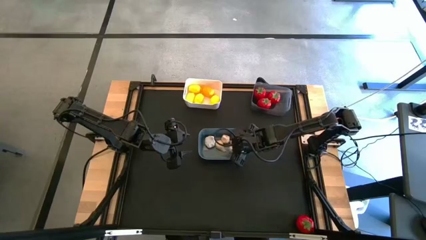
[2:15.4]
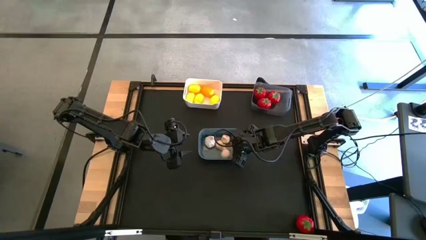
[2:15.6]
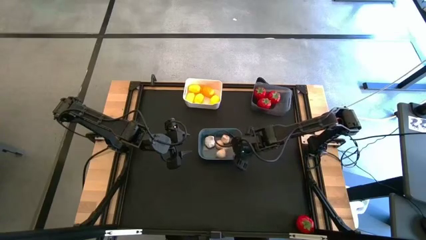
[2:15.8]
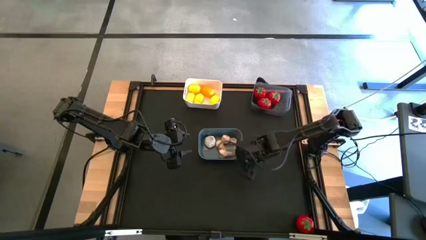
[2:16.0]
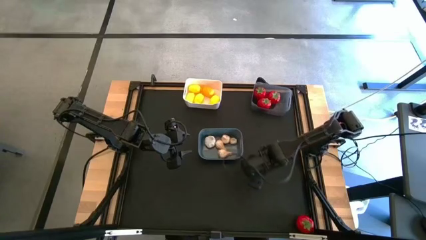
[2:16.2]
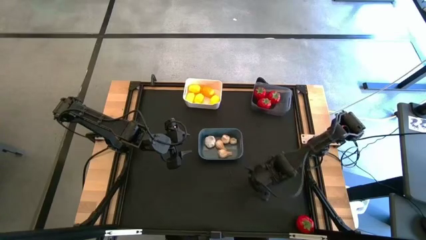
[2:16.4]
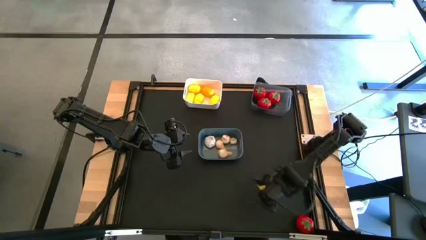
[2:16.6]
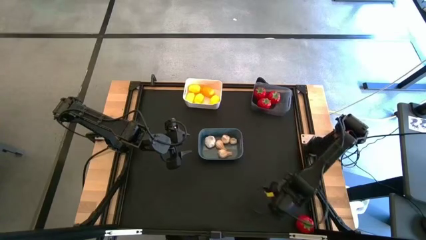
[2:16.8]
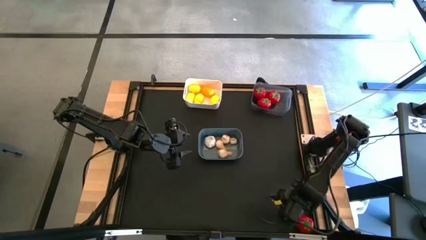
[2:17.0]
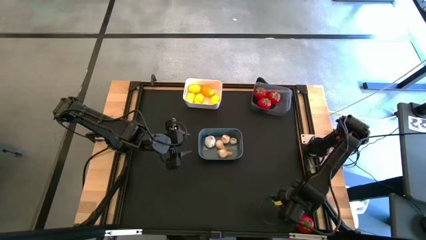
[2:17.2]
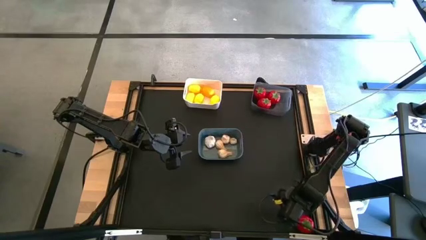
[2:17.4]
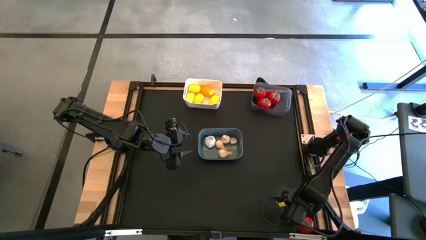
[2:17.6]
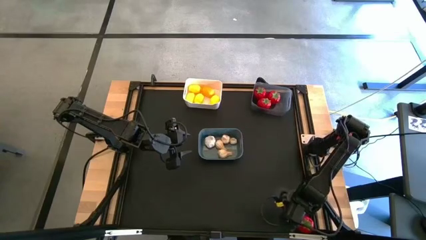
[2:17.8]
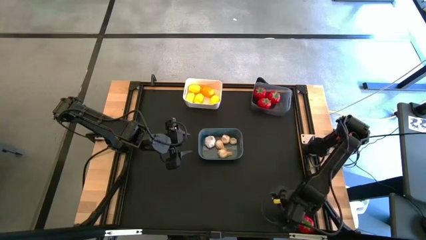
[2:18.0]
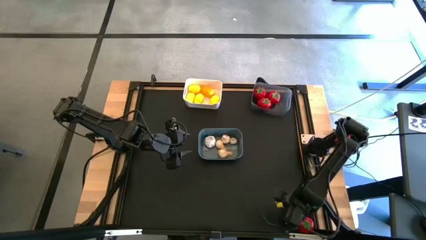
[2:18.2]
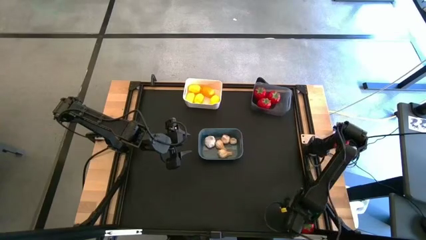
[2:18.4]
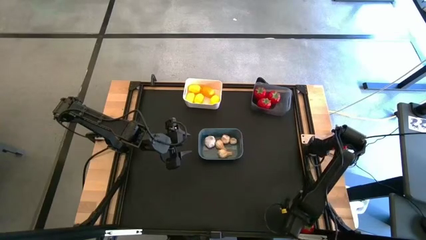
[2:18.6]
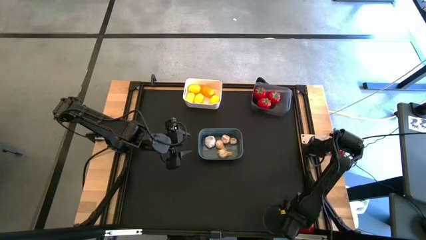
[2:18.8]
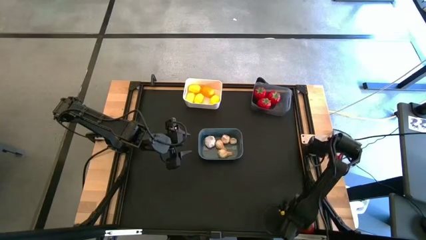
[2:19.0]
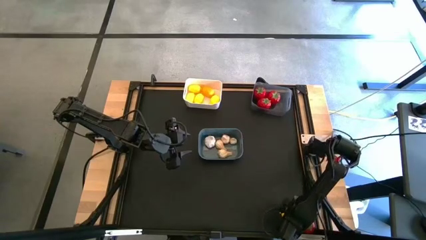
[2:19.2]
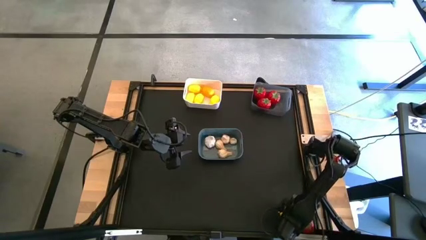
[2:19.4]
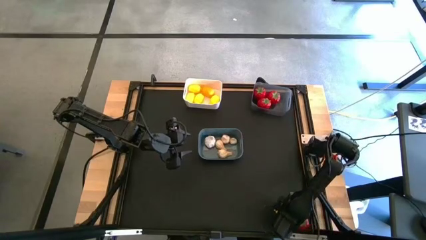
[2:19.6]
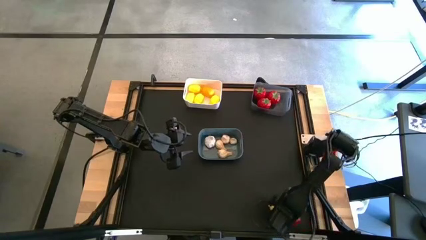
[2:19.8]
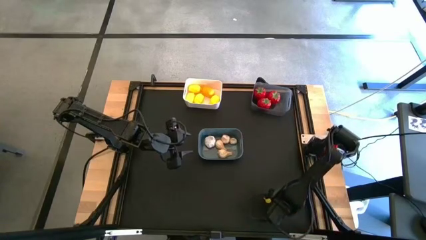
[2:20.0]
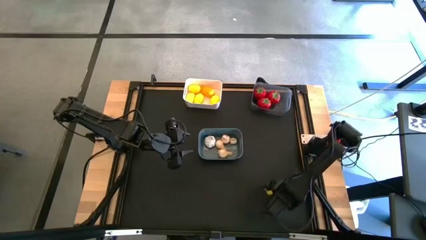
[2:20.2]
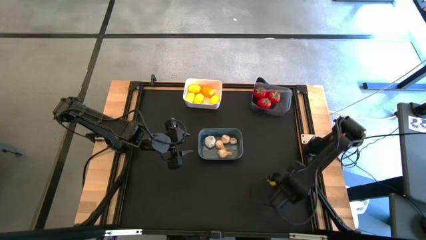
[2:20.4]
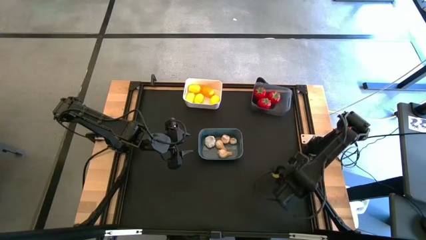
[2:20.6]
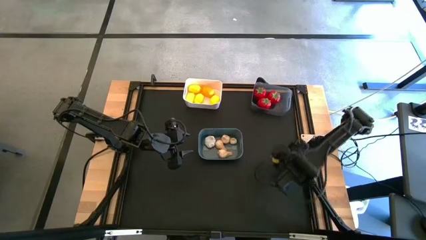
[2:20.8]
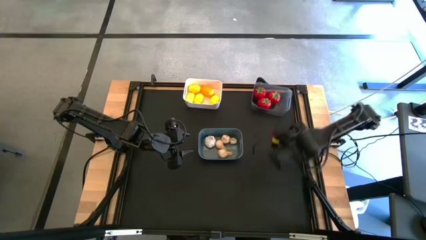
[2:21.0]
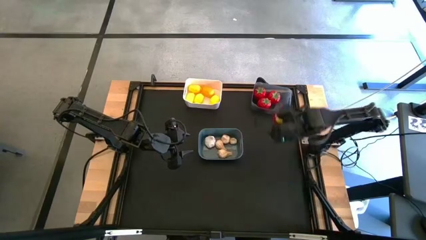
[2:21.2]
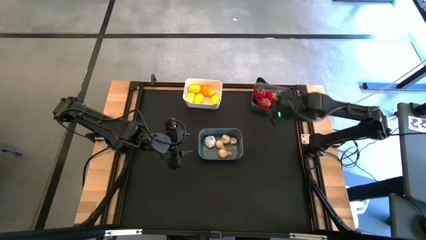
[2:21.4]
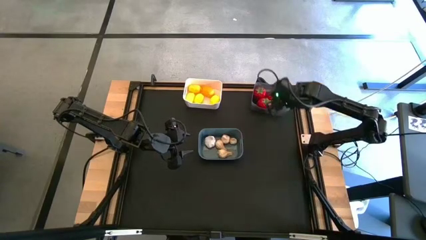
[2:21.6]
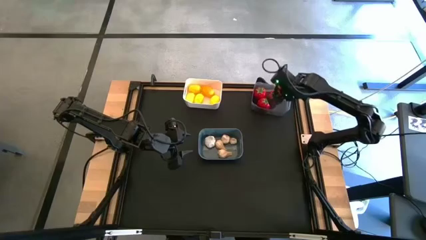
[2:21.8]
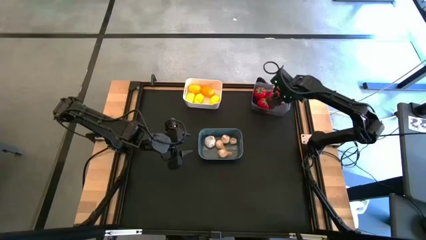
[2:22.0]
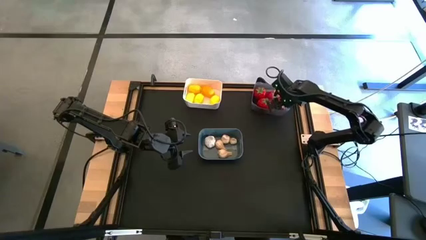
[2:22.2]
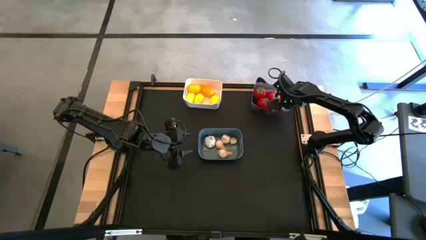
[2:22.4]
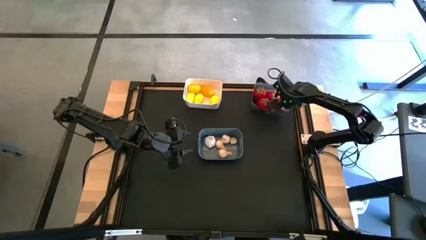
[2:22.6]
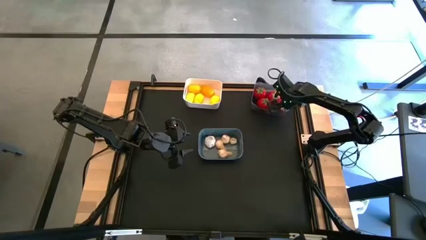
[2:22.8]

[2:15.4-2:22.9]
Task: Sort produce into baskets
Put the red tomato into the black bin

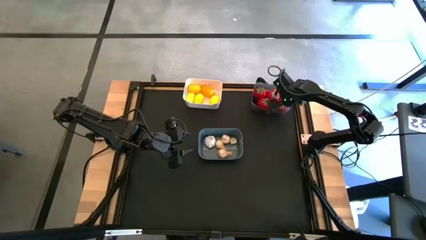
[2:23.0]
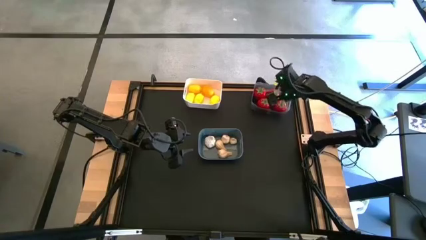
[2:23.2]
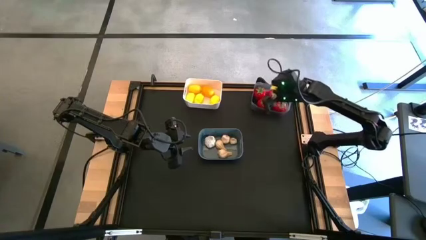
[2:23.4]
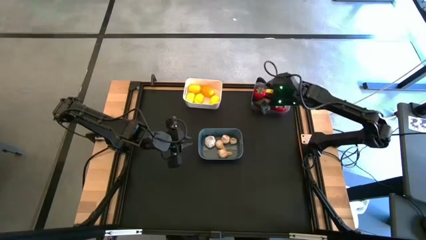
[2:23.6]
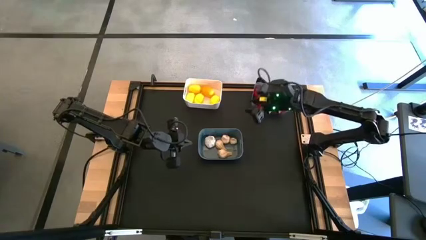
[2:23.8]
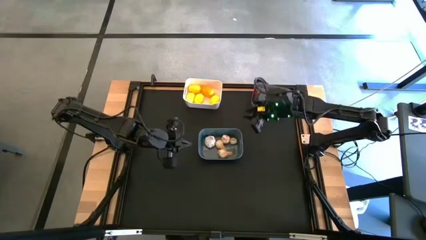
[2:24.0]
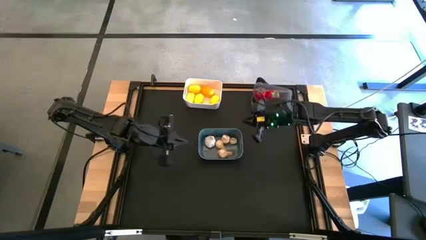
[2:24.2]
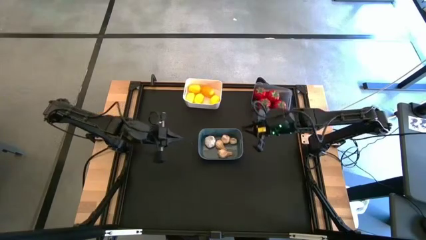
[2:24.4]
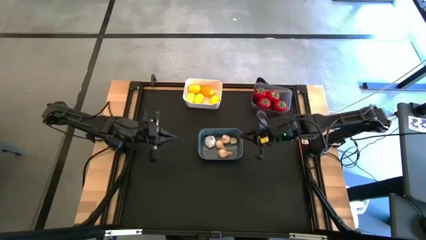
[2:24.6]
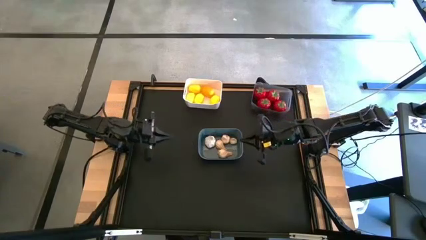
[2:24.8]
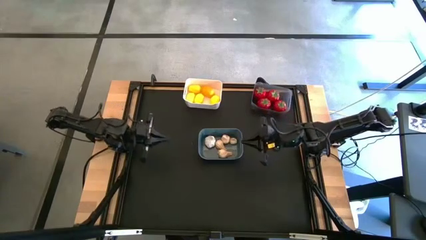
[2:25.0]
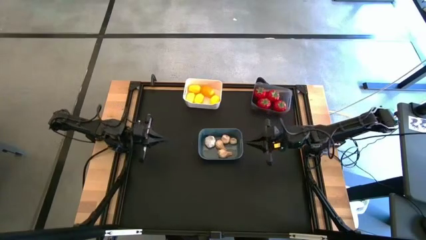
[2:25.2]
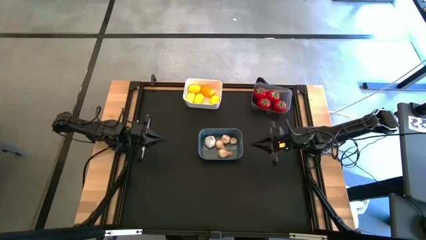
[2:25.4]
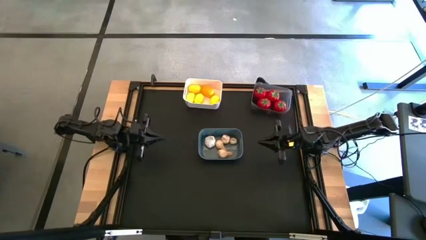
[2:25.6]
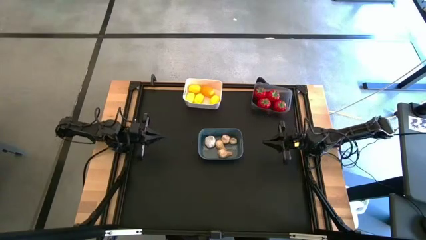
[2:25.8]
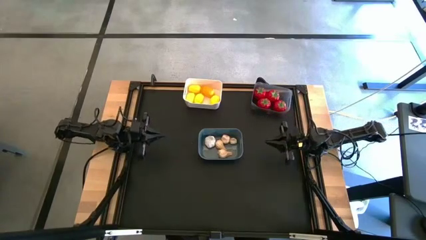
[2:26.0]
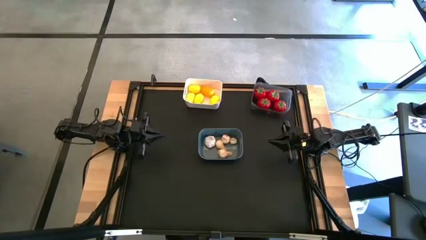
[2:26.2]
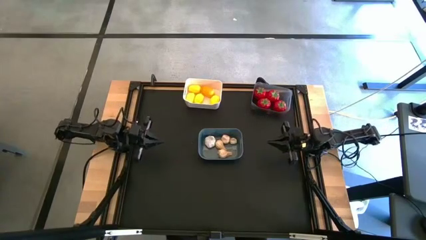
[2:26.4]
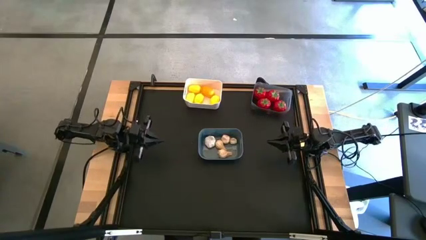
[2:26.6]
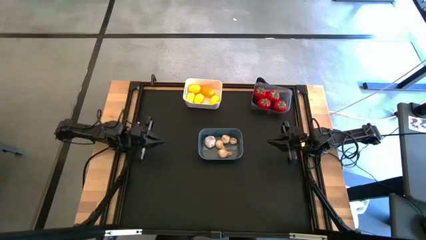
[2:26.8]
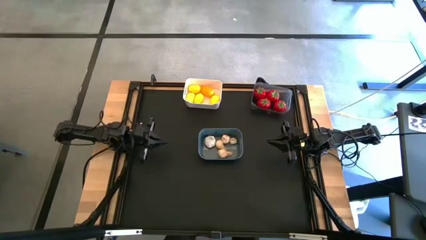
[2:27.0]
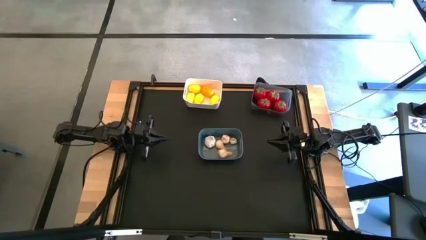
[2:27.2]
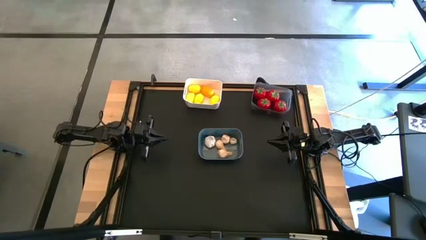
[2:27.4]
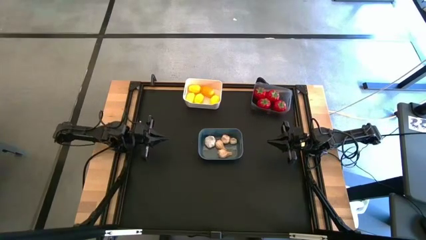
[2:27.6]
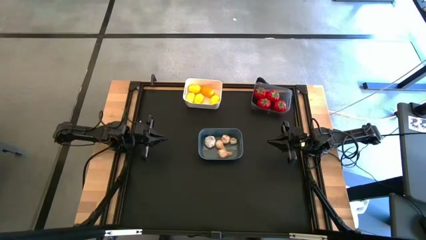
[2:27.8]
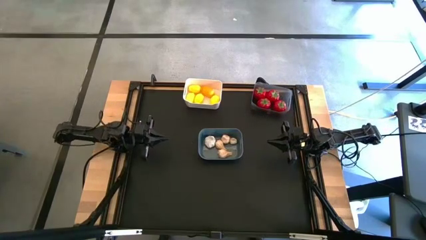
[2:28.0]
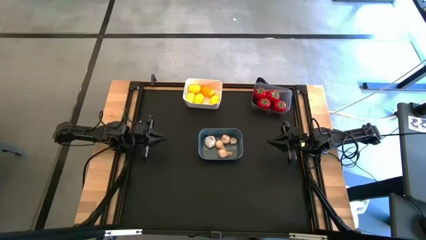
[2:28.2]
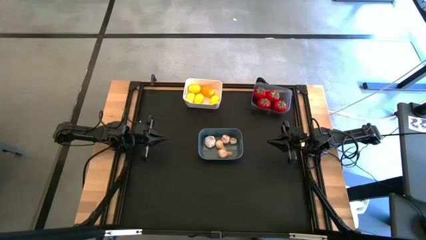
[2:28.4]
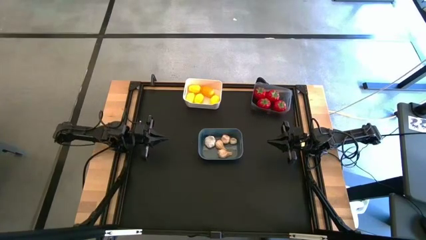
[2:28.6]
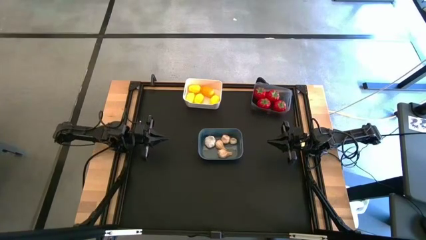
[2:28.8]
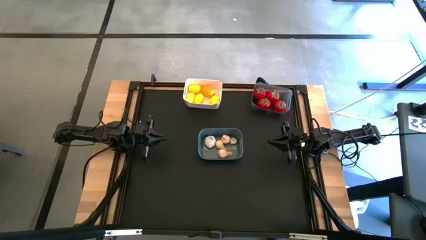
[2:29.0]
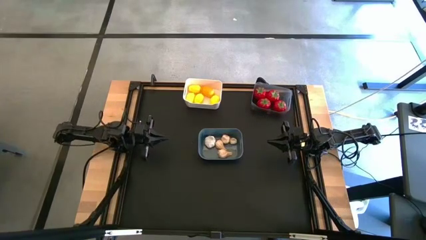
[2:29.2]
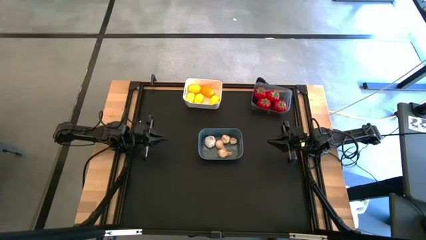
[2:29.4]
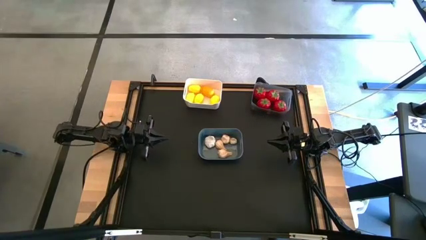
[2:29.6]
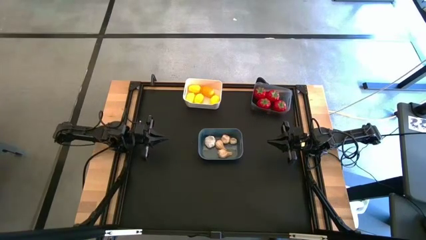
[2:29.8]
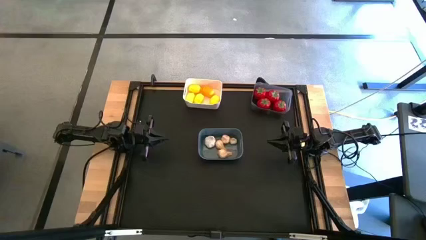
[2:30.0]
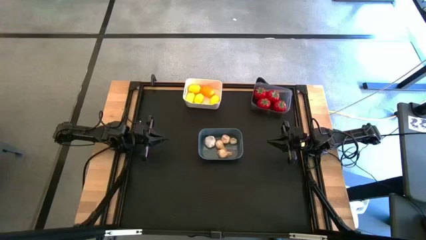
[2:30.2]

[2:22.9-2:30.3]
Return to Home Position
